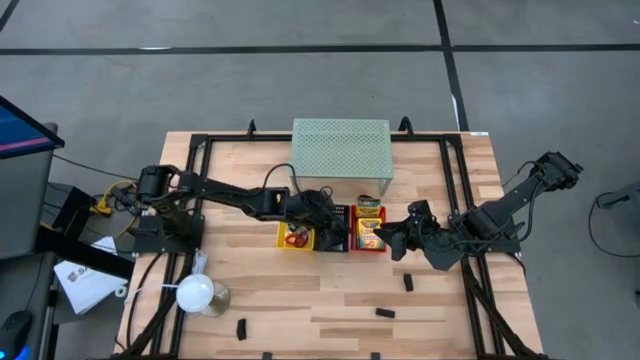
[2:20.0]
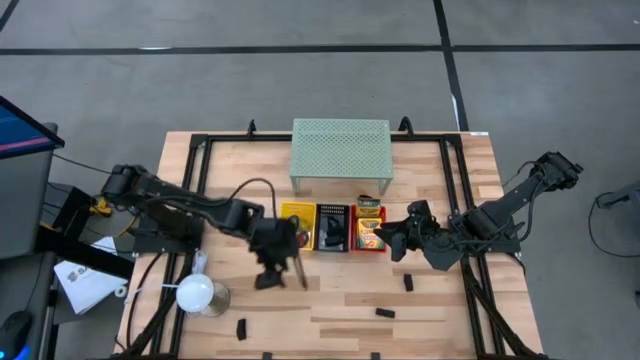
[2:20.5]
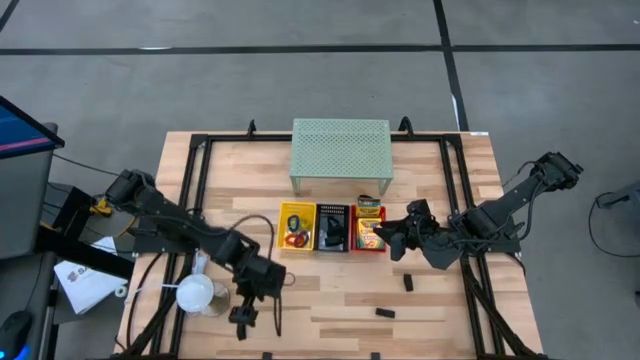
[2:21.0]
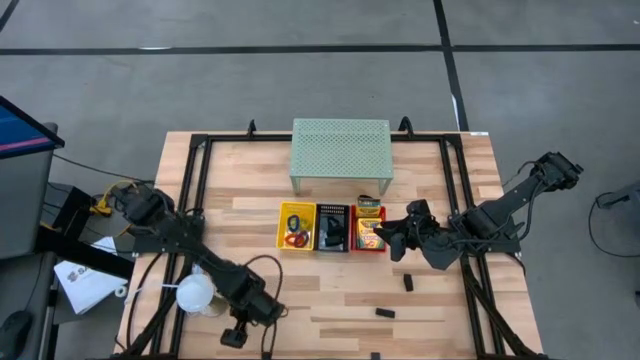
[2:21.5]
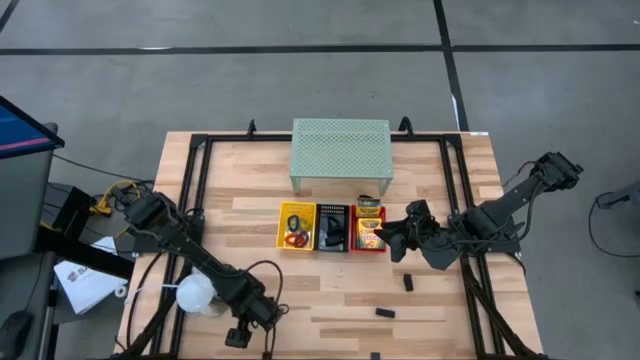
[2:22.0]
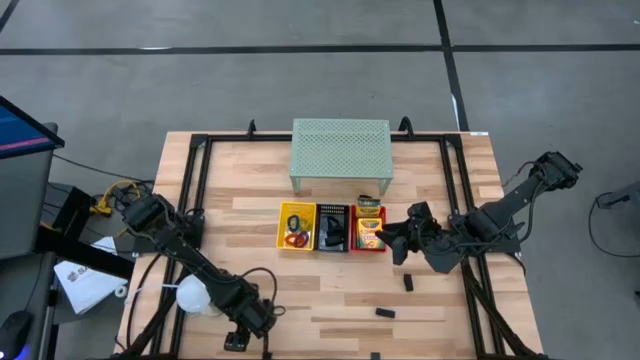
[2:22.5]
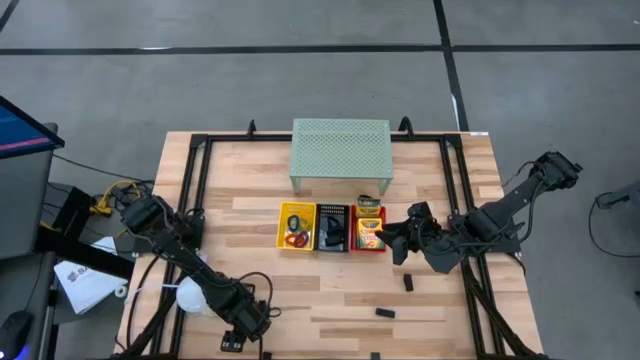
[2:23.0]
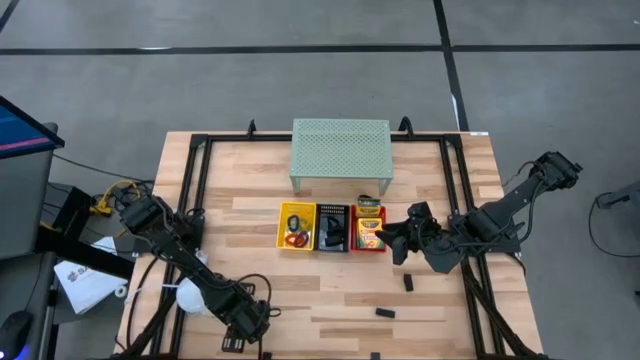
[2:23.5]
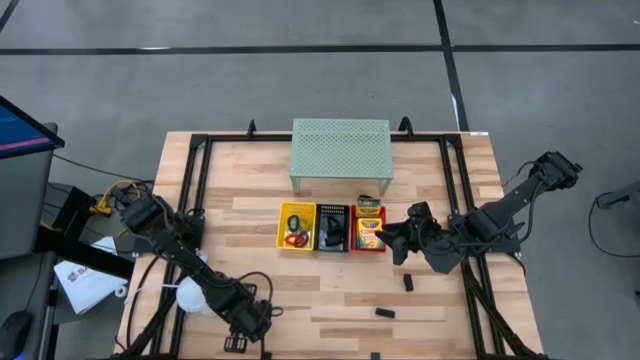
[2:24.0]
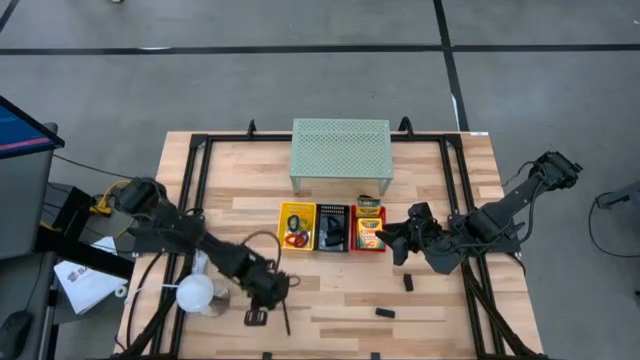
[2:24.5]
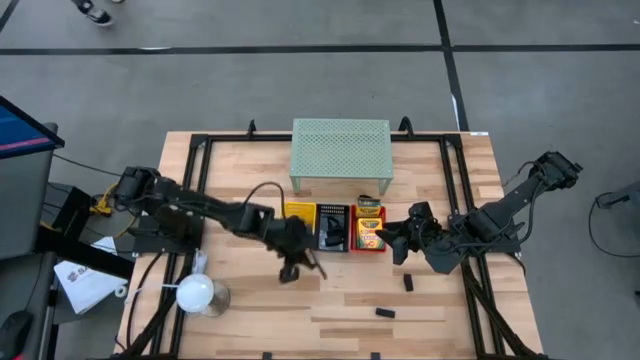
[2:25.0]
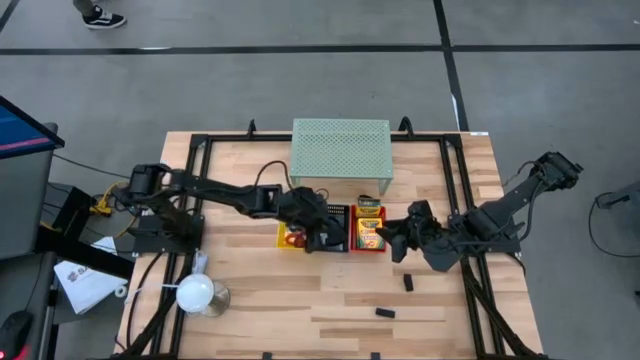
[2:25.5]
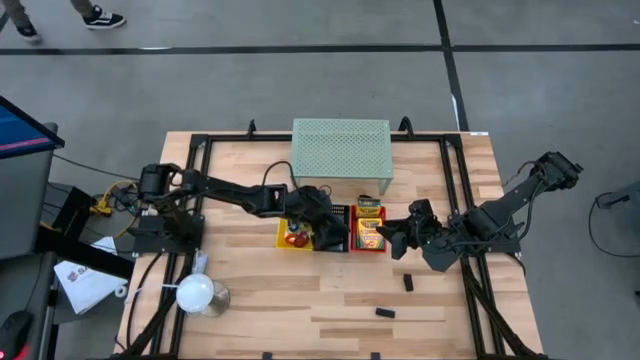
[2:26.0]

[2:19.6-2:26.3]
Task: Pick & Place Office Desk Supplies
Put the black rubber band into the black bin

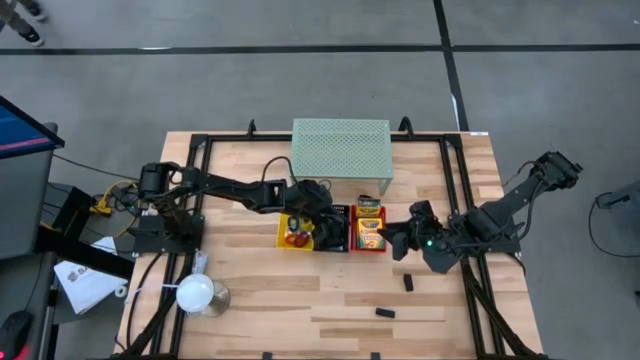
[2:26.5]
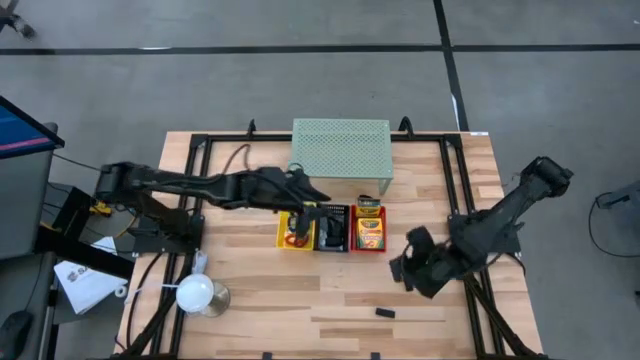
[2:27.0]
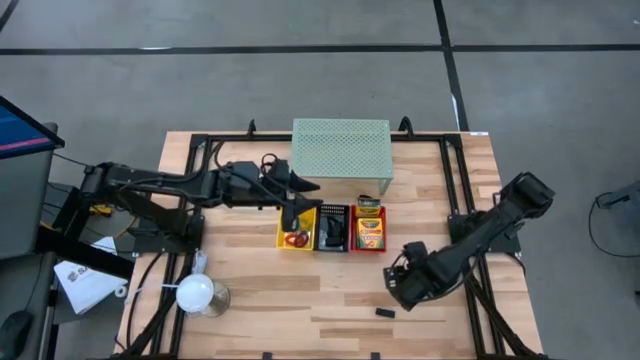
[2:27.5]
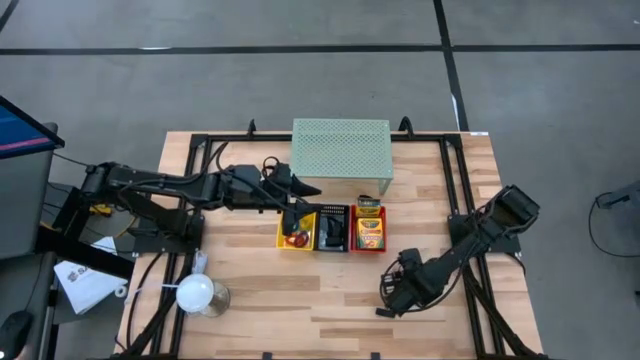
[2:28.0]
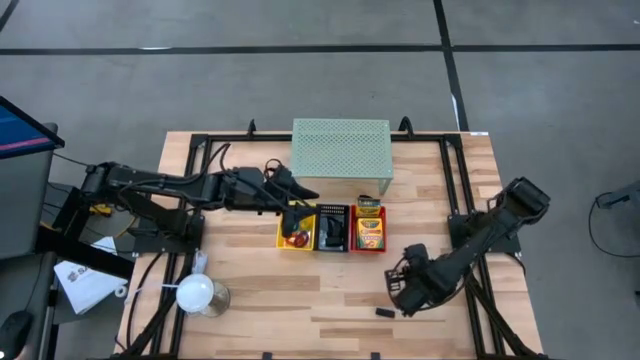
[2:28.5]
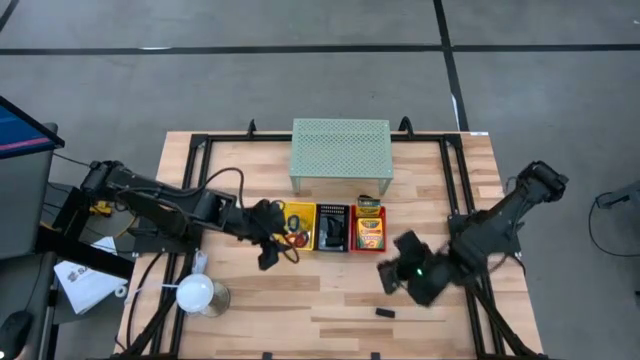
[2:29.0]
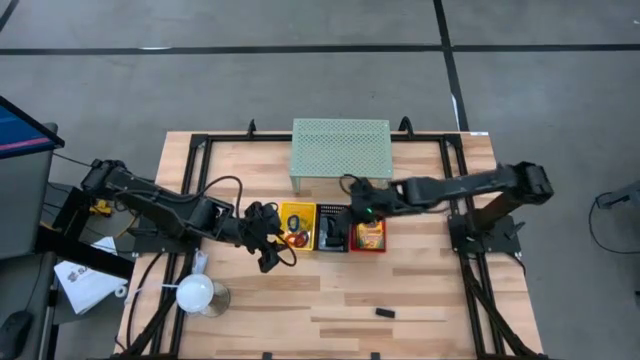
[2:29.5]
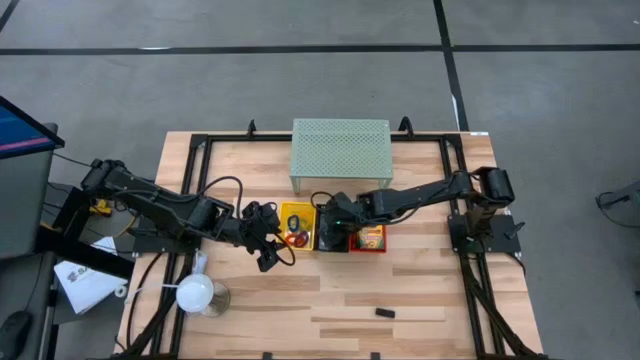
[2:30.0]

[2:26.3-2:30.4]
Put the black rubber band into the black bin

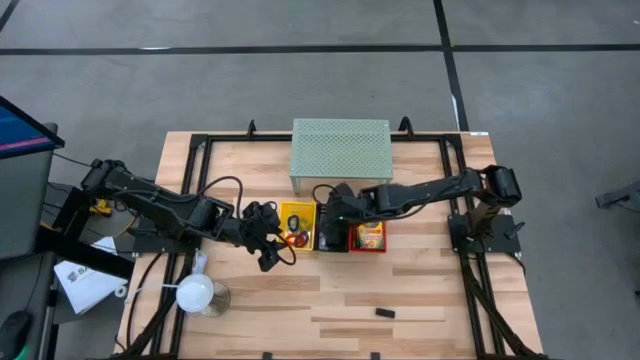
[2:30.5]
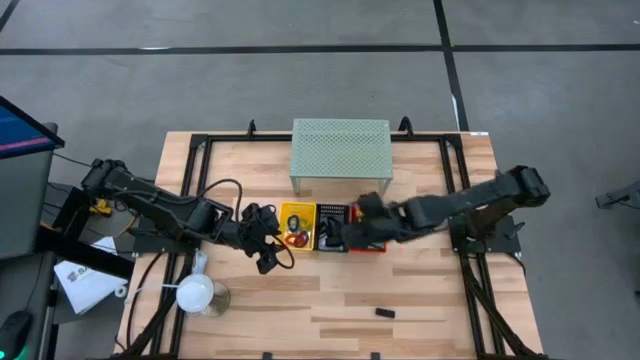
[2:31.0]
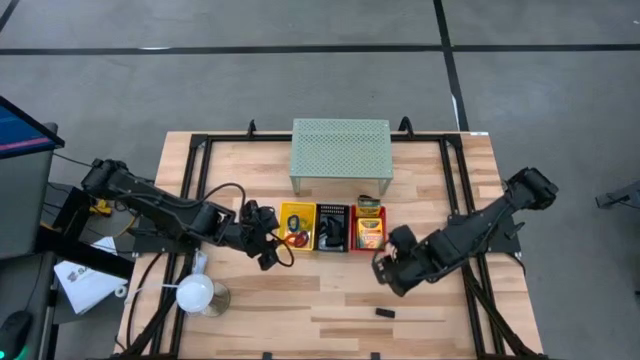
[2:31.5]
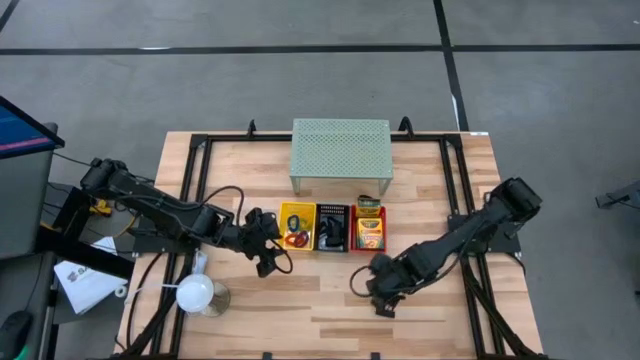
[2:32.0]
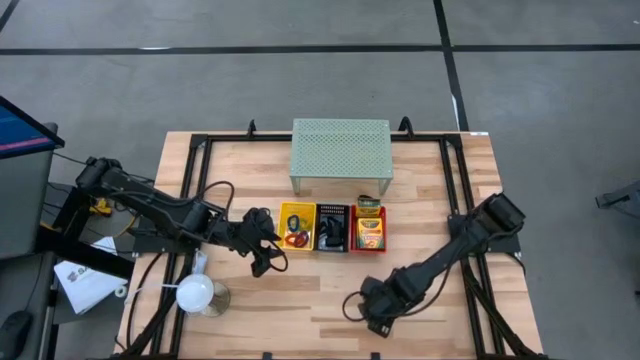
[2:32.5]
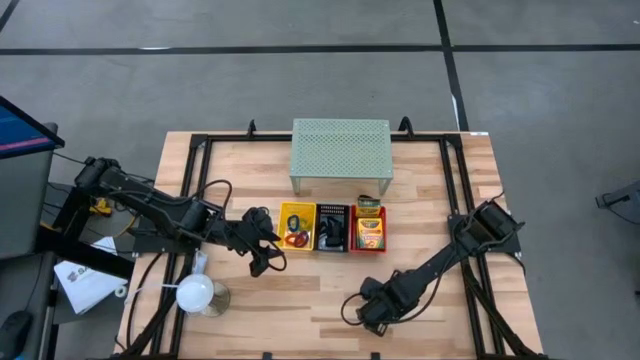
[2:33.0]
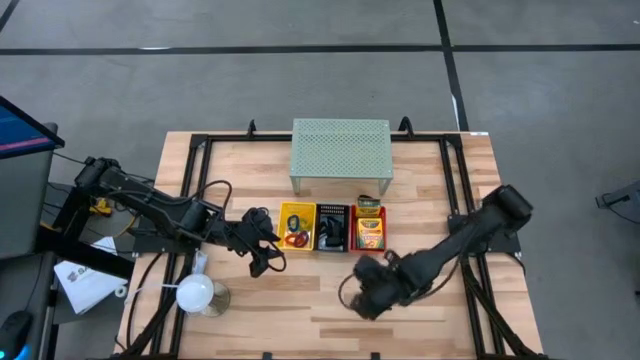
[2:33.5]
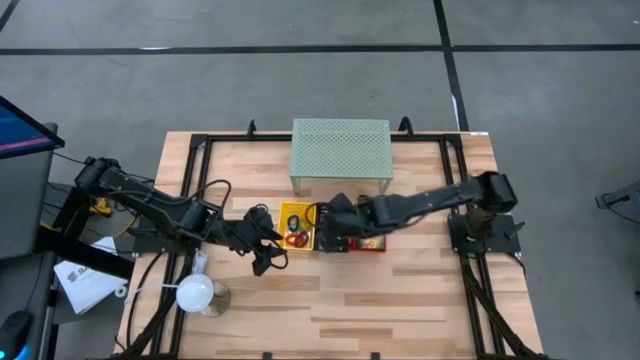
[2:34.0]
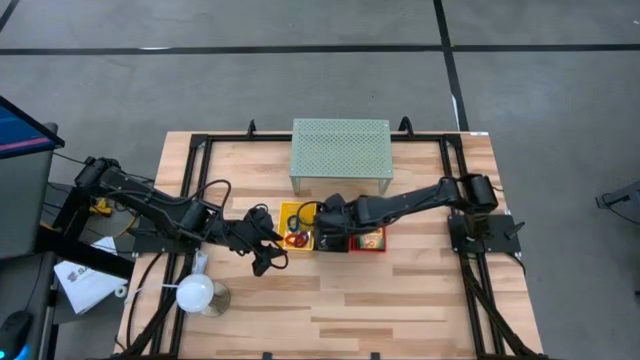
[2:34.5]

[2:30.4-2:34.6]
Put the black rubber band into the black bin

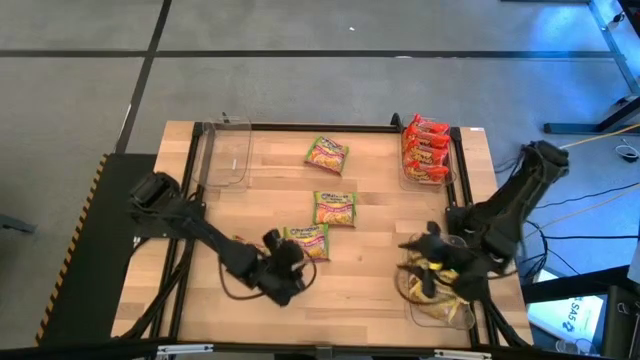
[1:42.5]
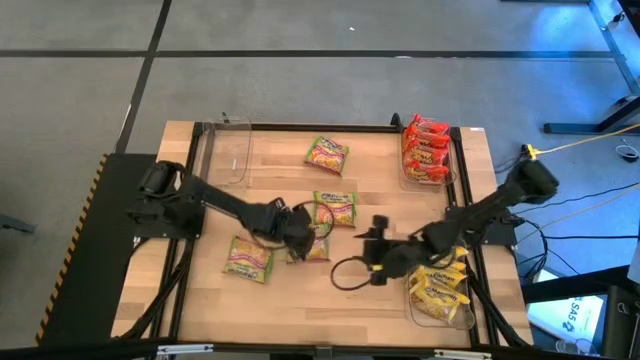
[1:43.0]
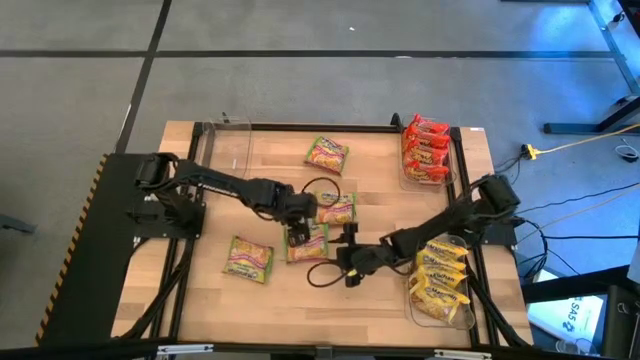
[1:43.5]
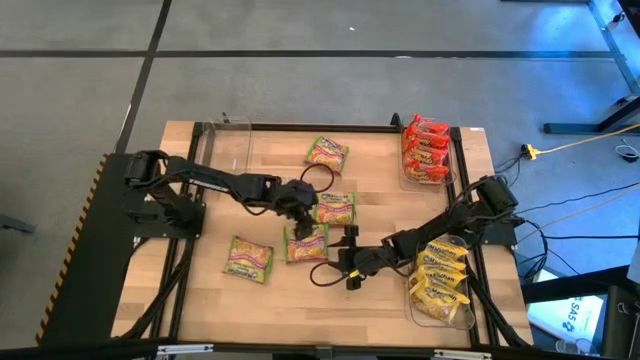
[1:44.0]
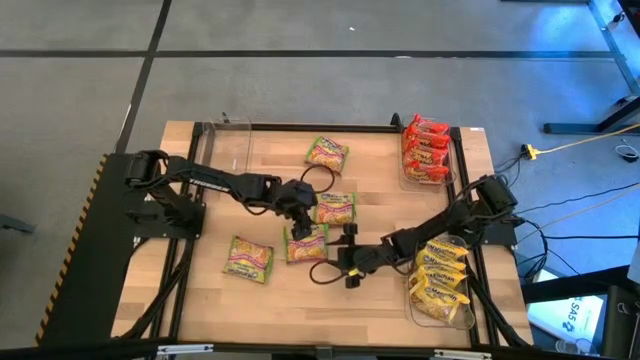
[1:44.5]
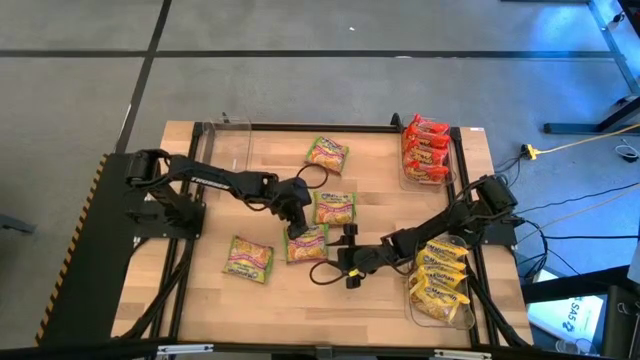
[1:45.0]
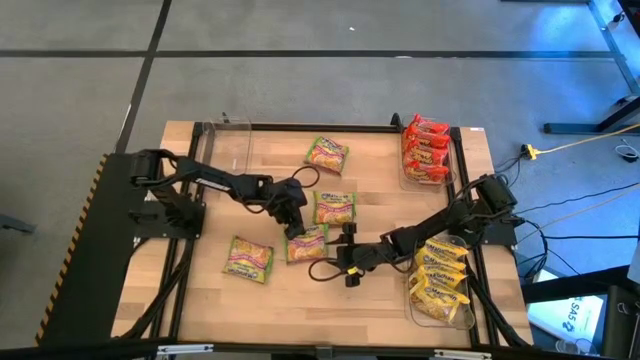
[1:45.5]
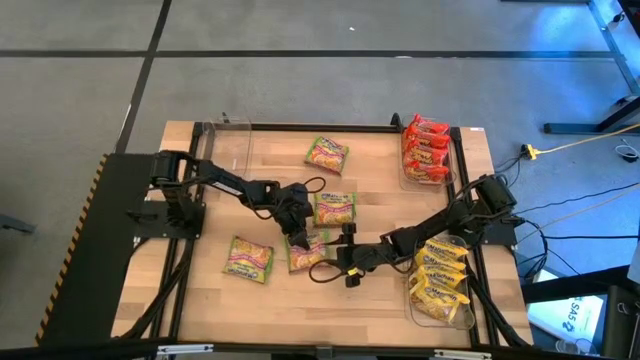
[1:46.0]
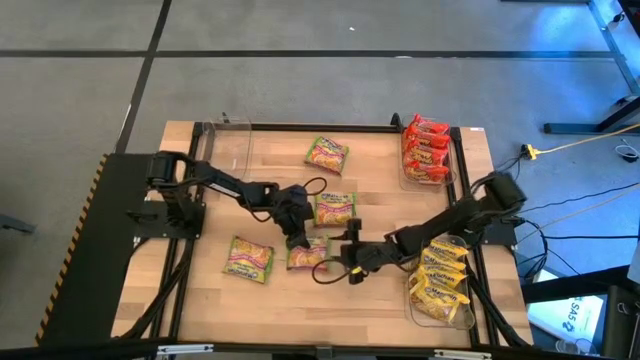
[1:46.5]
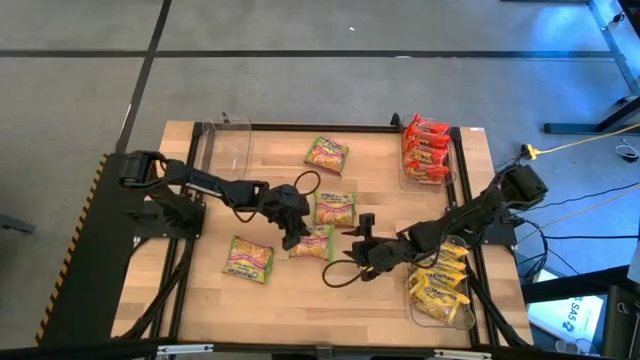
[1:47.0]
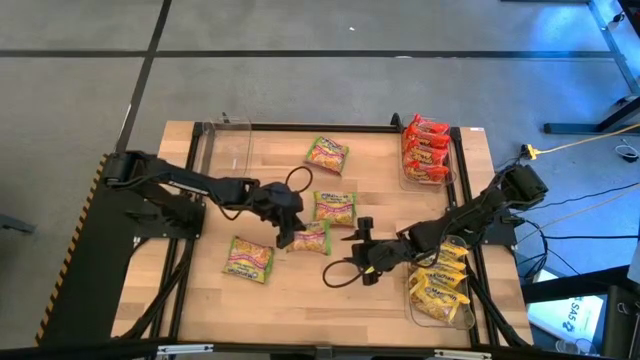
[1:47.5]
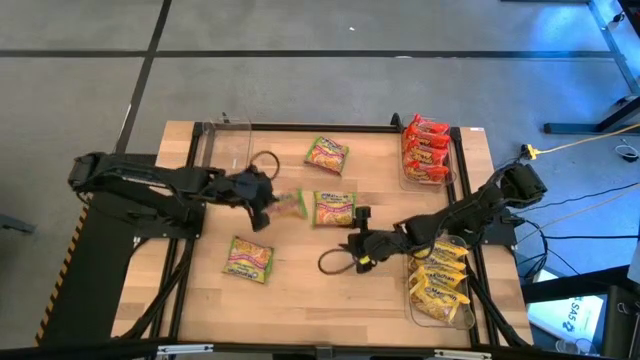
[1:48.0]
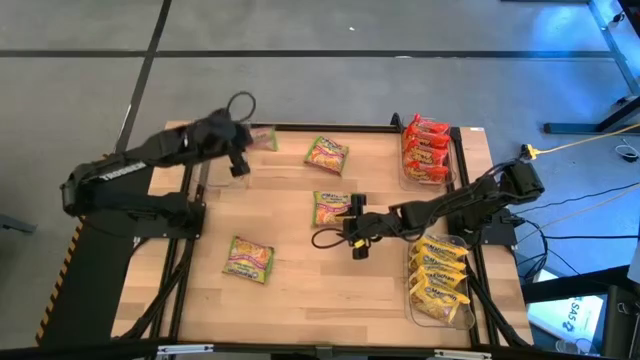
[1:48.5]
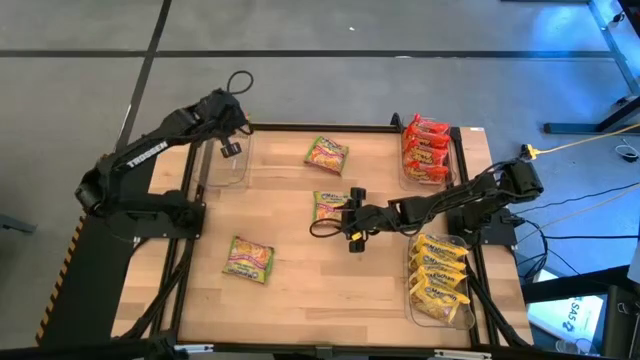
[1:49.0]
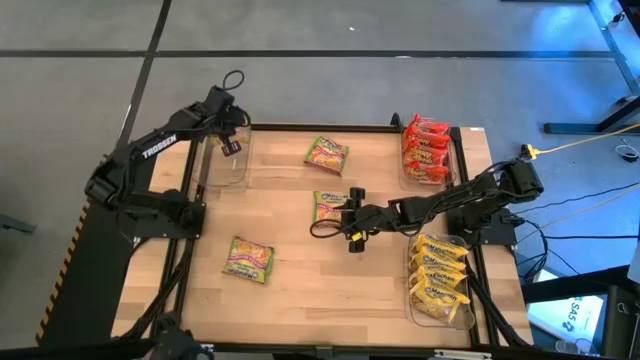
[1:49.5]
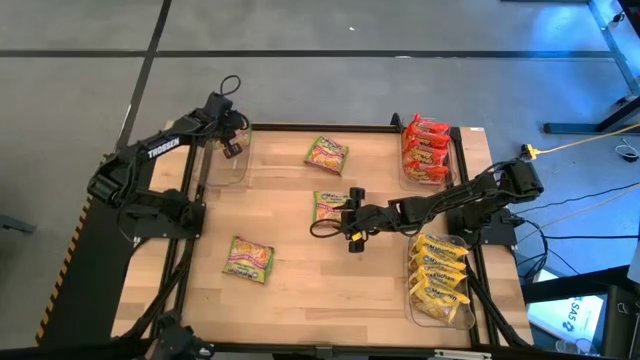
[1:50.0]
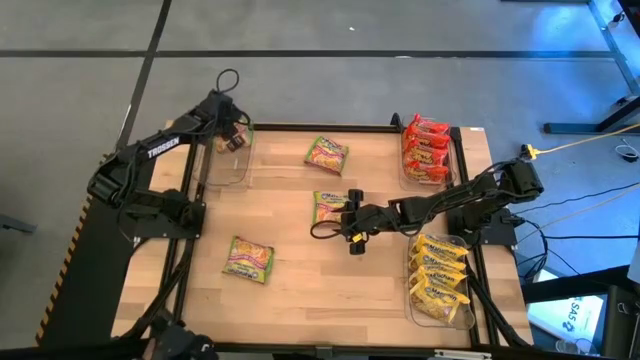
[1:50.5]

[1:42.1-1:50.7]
Task: Sort Maruchan noodles
Put the green noodle pack into the top left transparent bin
